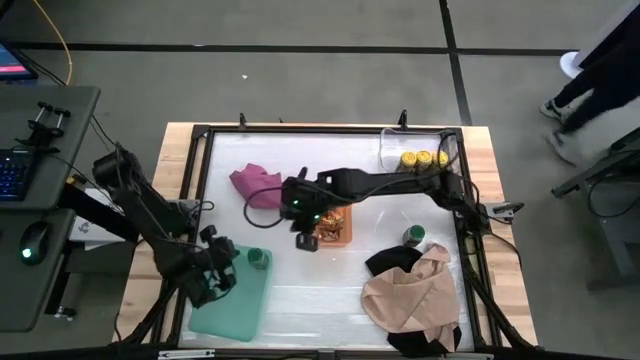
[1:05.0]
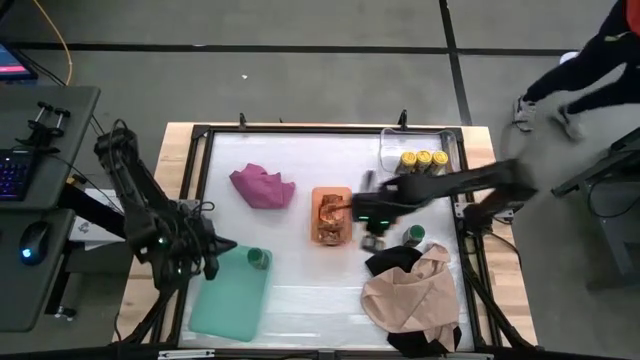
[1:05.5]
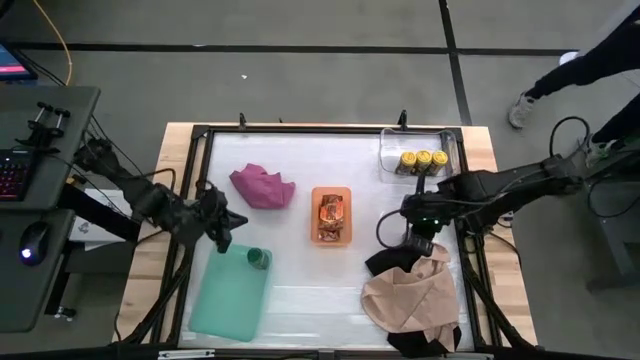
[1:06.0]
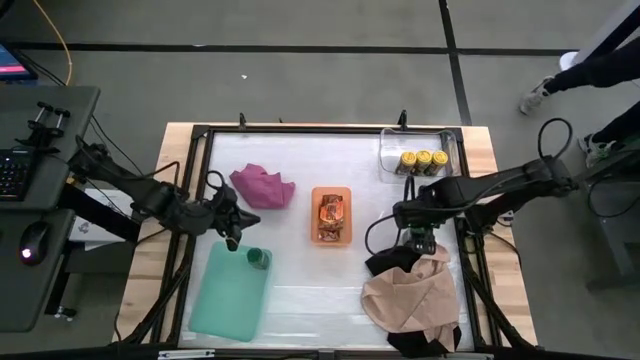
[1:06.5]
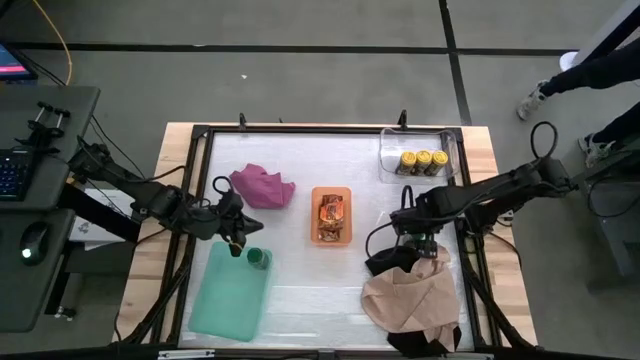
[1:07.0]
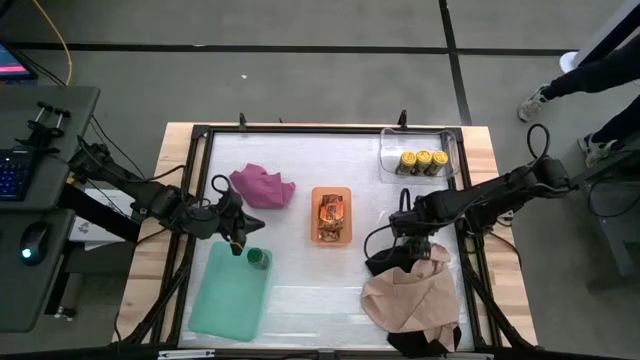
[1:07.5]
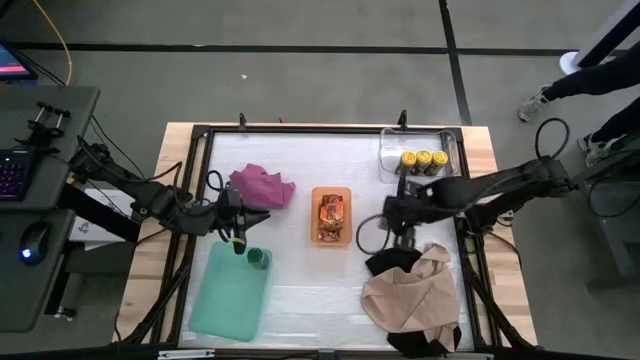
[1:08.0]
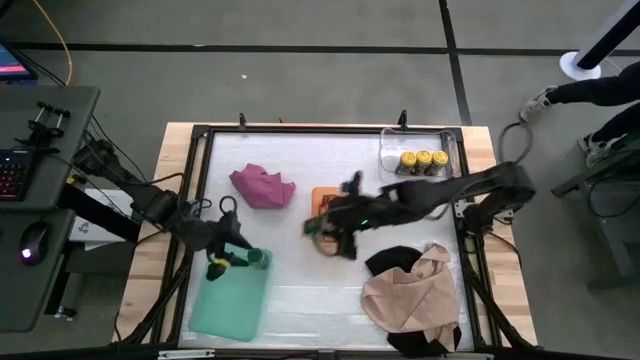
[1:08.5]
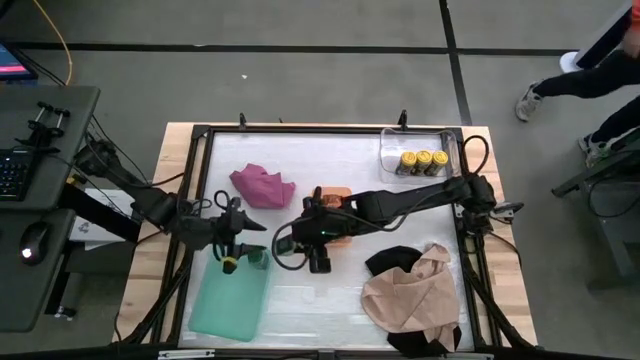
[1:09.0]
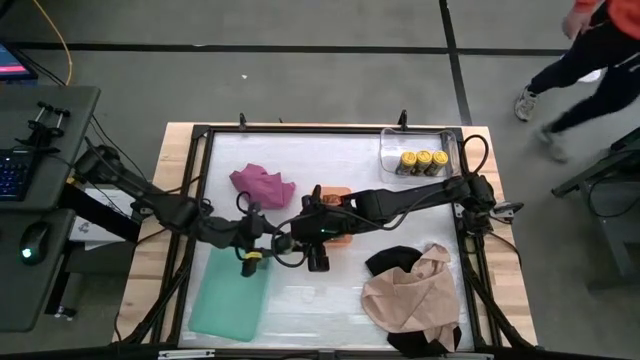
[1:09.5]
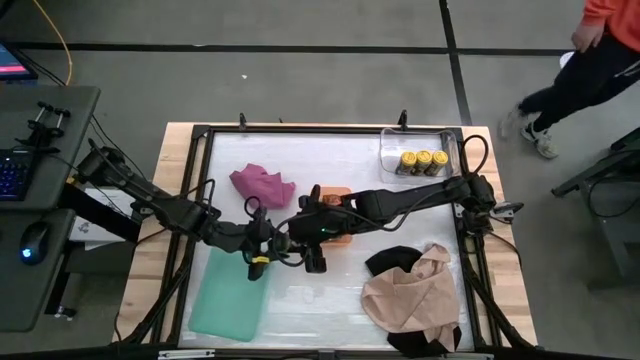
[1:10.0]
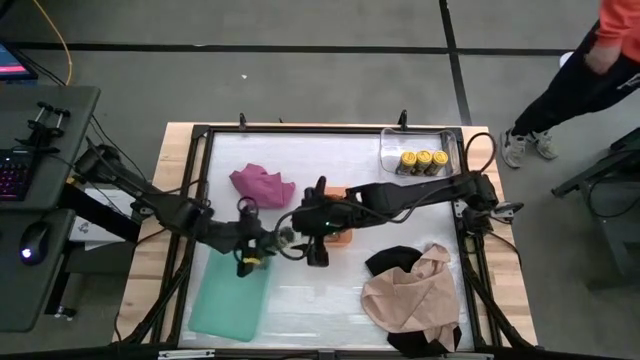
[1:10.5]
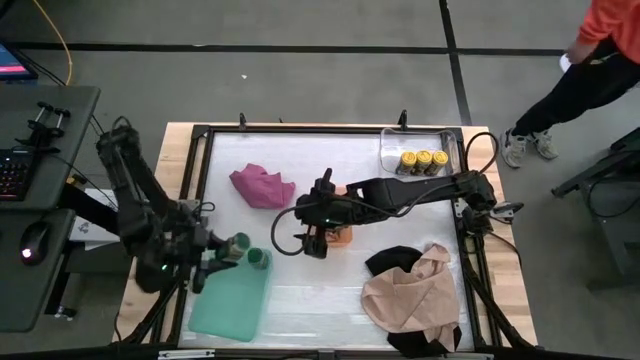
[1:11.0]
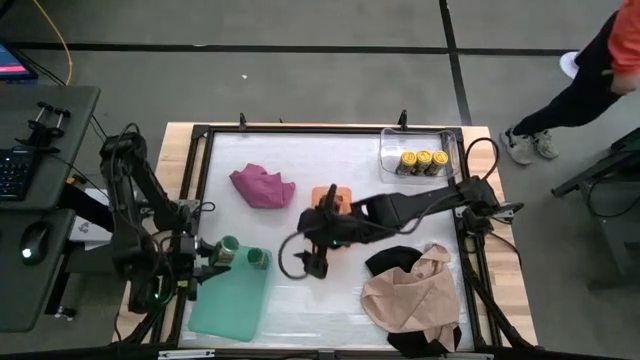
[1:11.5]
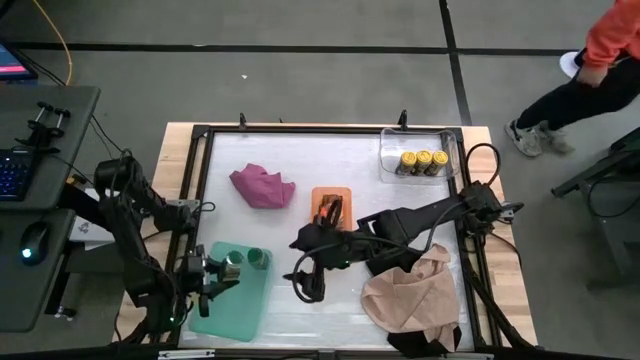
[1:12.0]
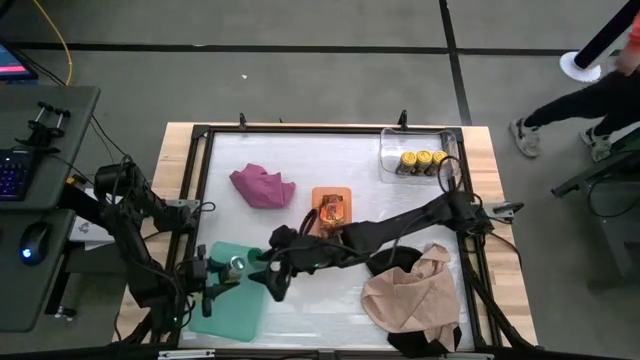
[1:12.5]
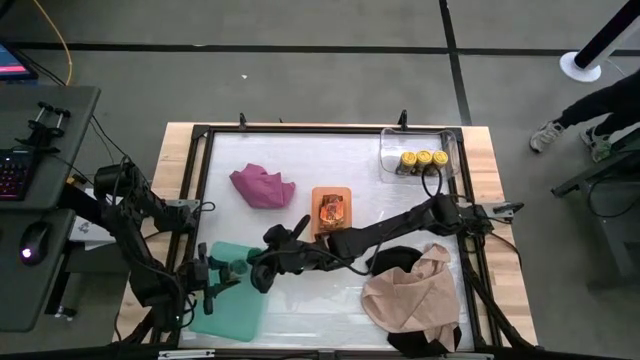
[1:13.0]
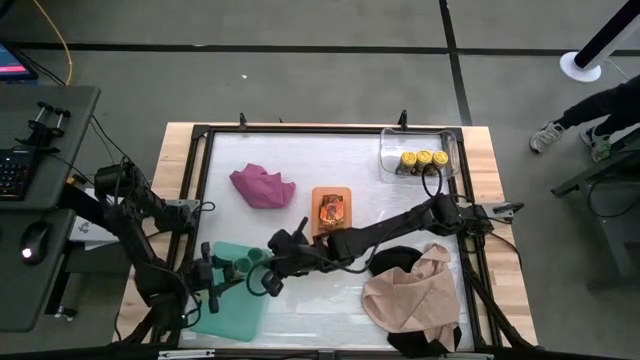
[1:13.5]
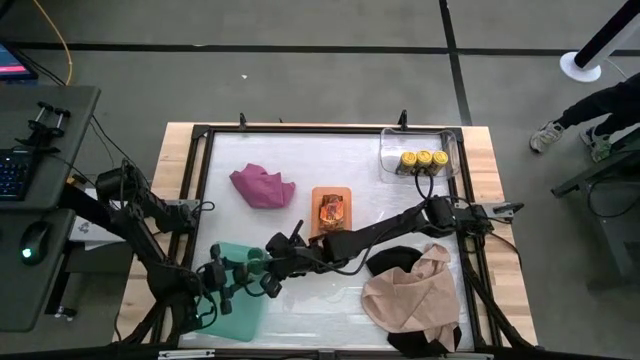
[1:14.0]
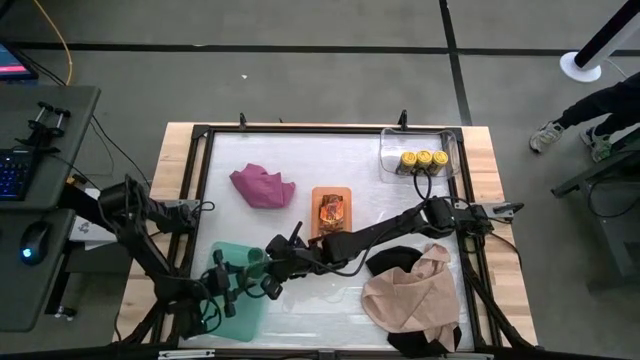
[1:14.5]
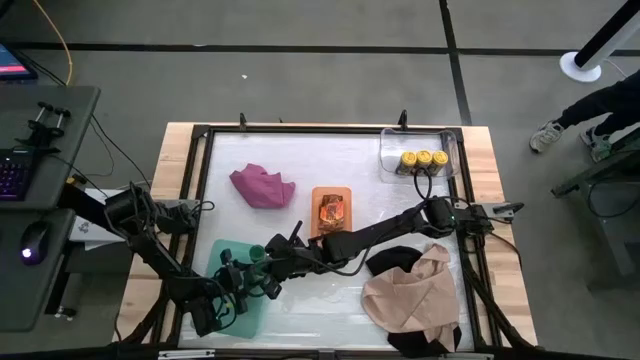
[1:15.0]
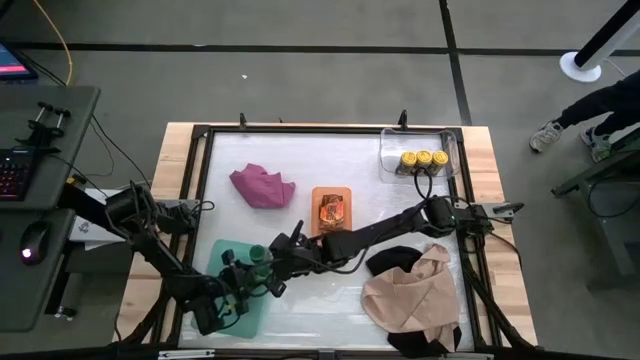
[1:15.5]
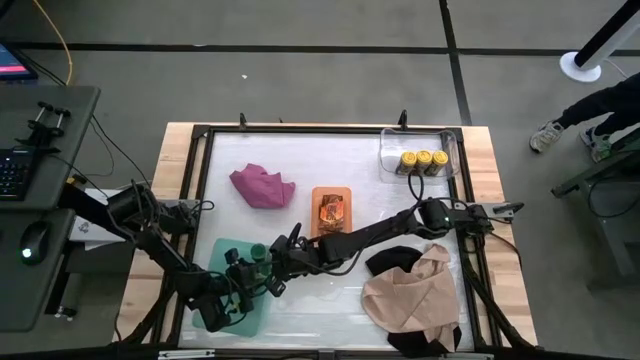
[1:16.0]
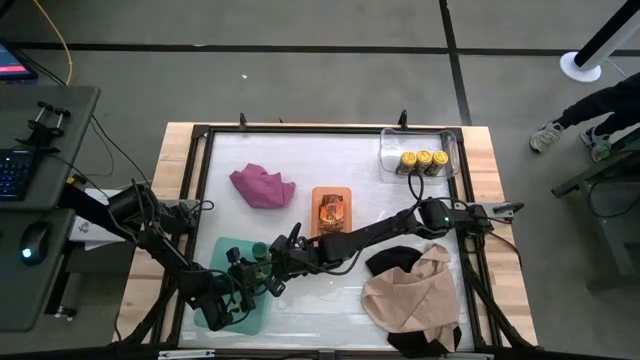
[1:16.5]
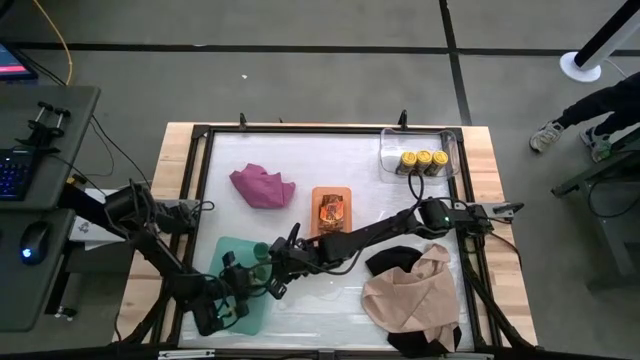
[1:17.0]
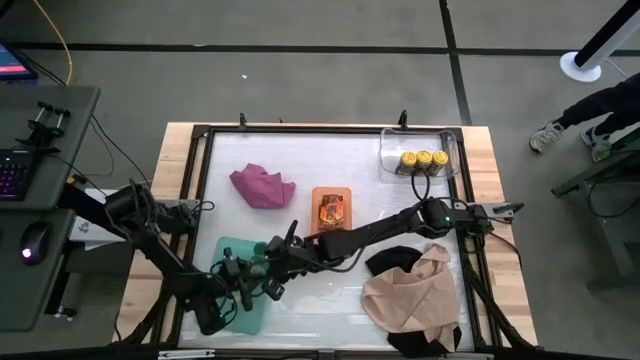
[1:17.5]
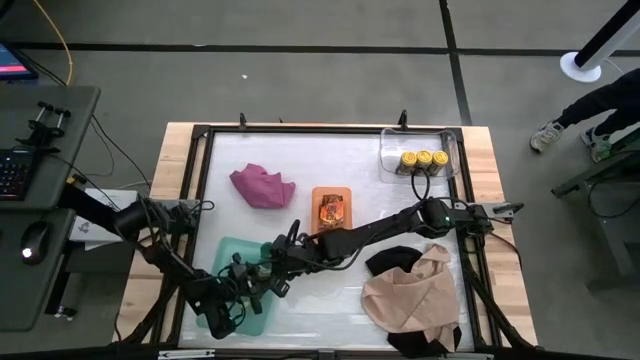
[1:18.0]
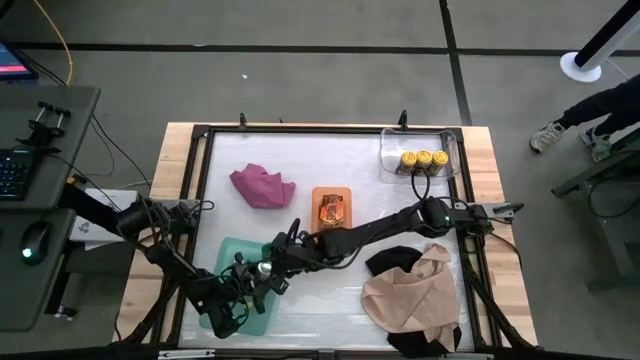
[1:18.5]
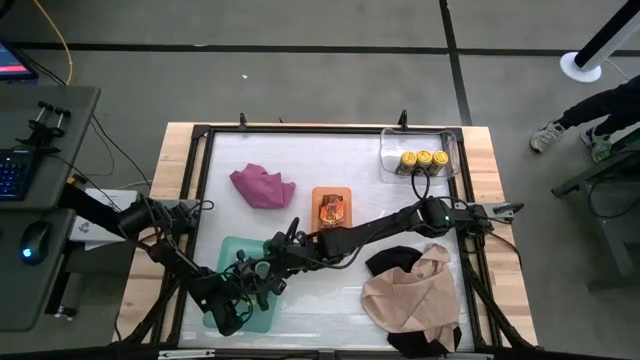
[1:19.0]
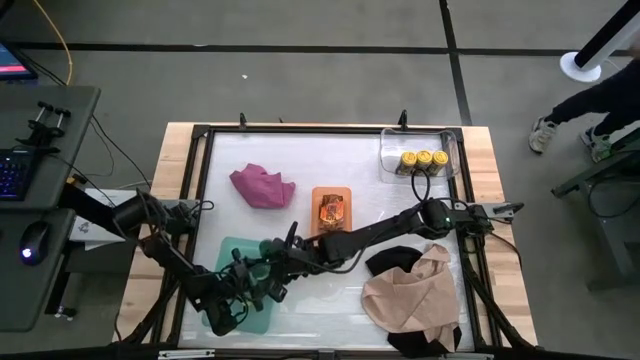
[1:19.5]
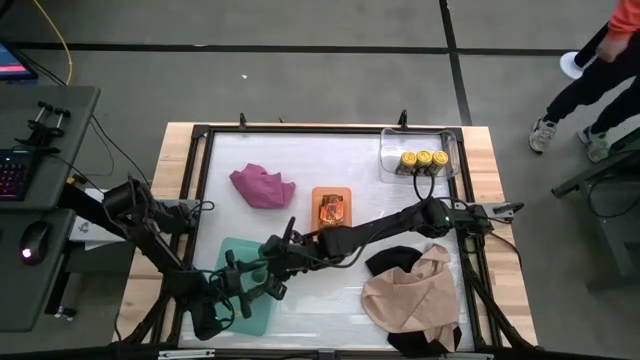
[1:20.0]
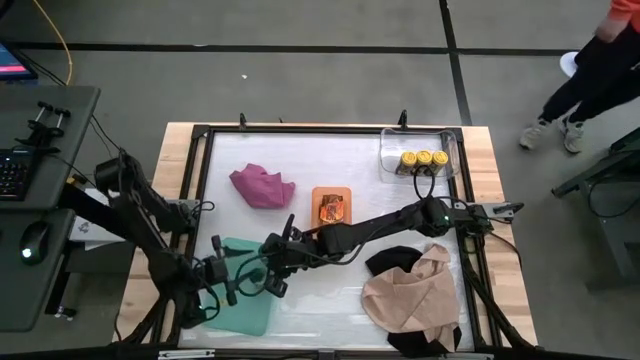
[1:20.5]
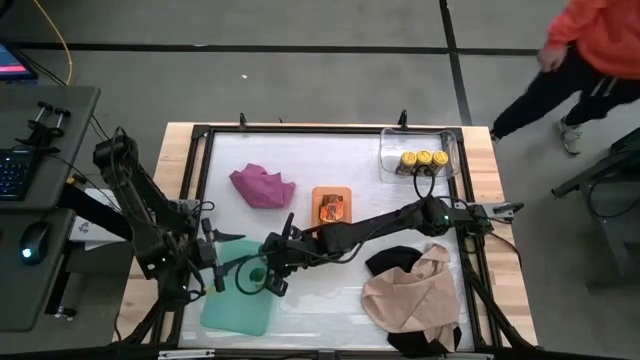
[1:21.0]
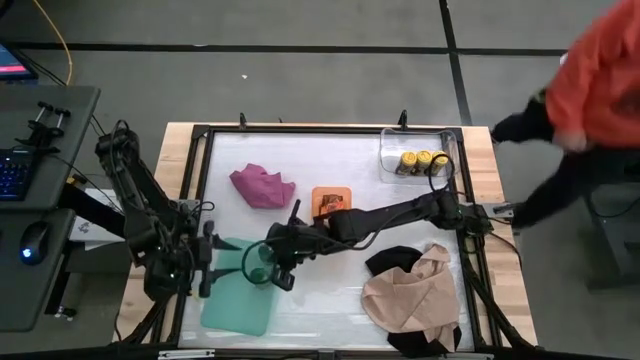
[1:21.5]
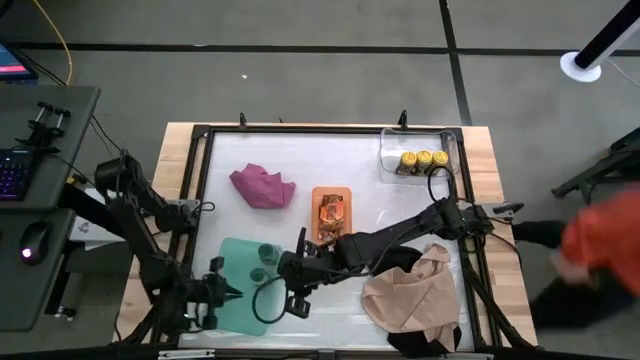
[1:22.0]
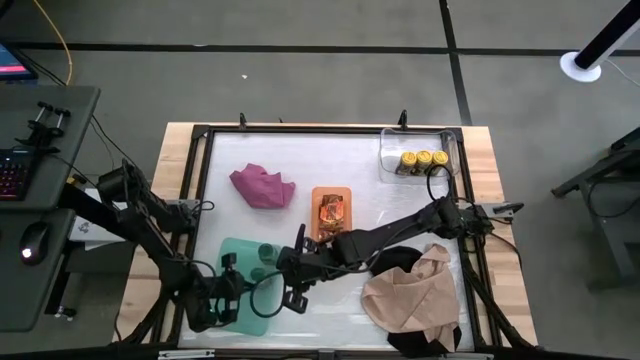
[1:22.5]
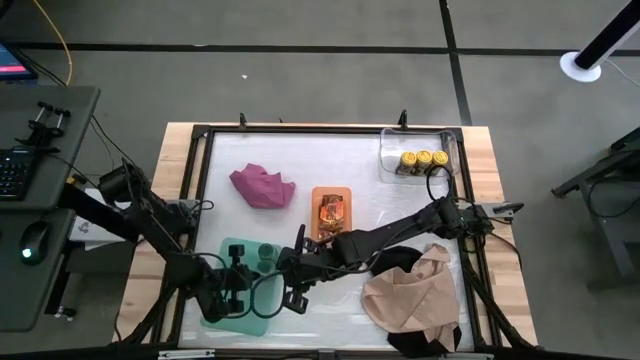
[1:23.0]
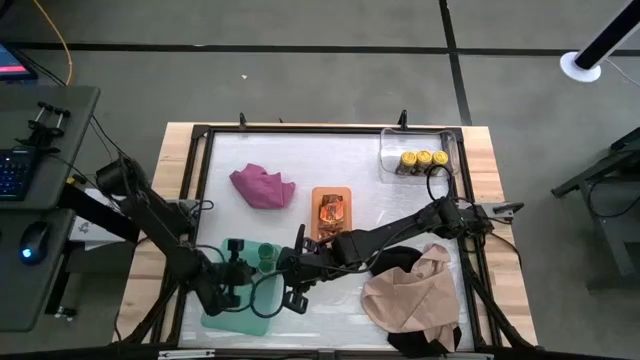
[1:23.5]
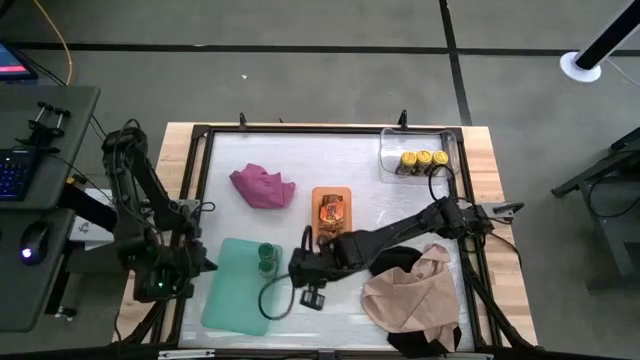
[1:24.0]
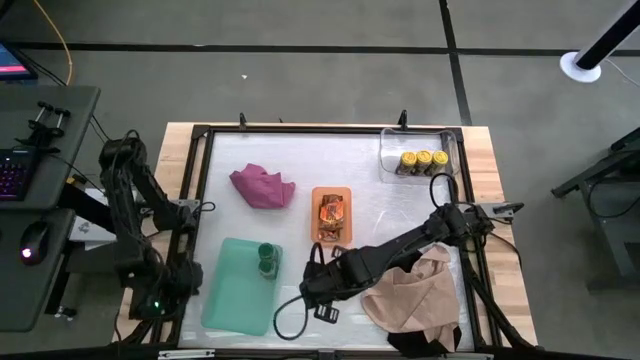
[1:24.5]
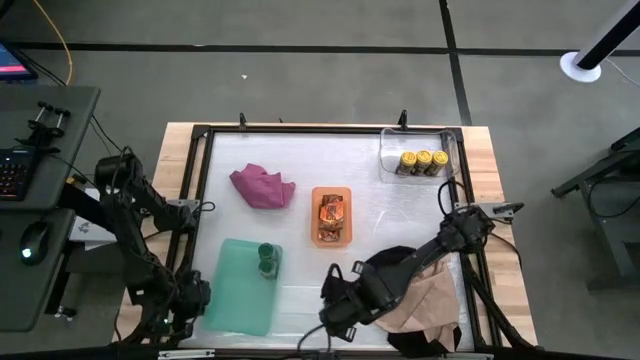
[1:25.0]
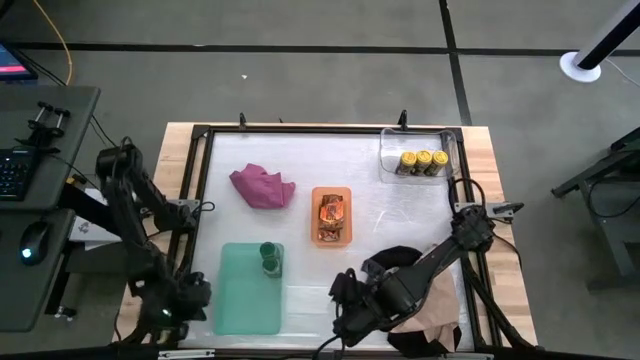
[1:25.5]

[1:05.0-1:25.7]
Task: Sort spices by type
Put the green seasoning bottle into the green bin
